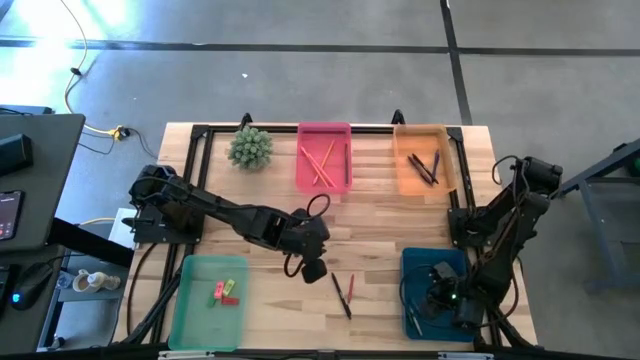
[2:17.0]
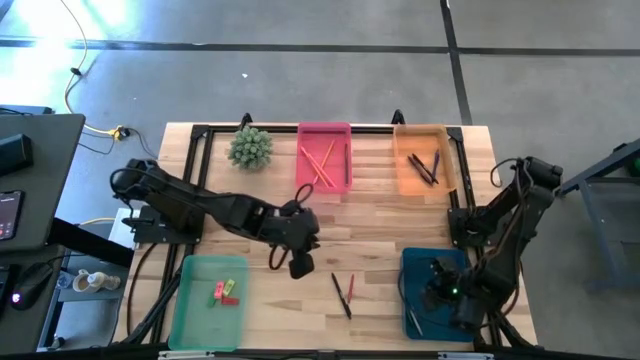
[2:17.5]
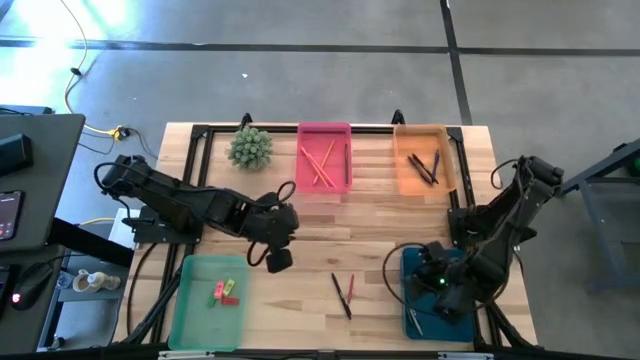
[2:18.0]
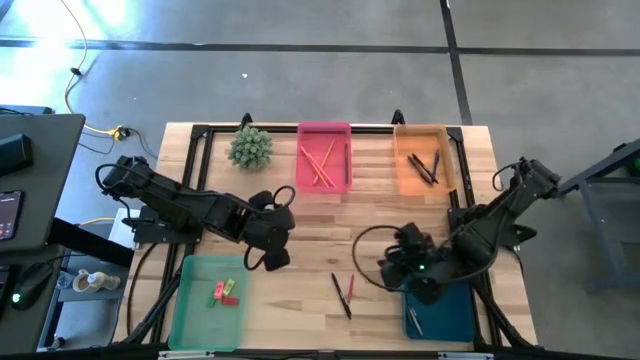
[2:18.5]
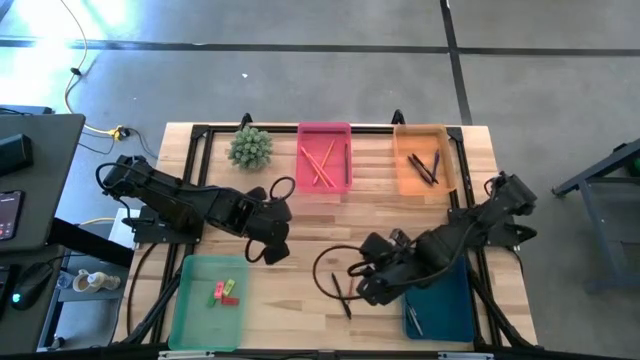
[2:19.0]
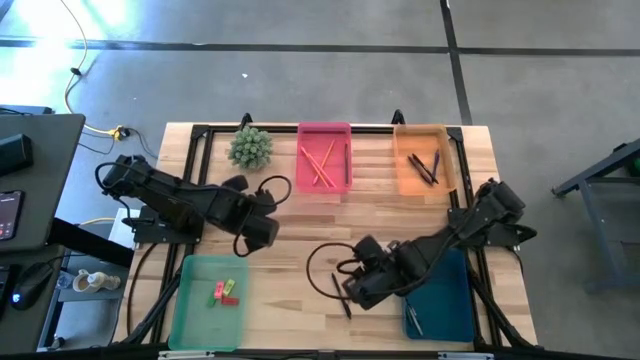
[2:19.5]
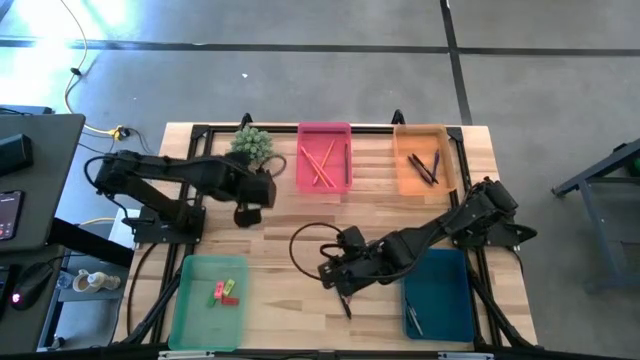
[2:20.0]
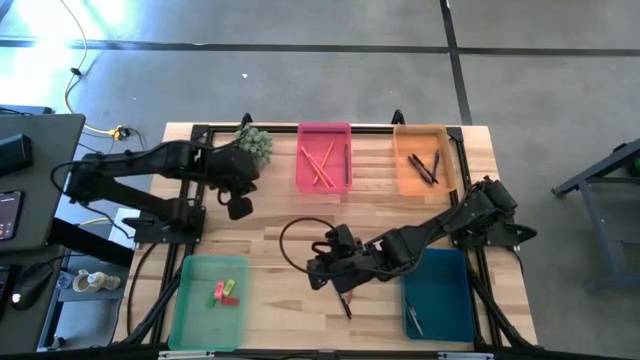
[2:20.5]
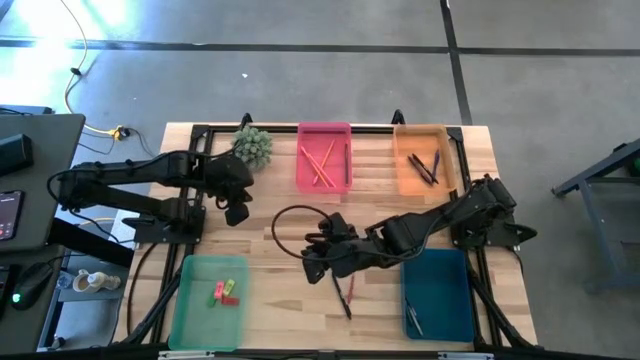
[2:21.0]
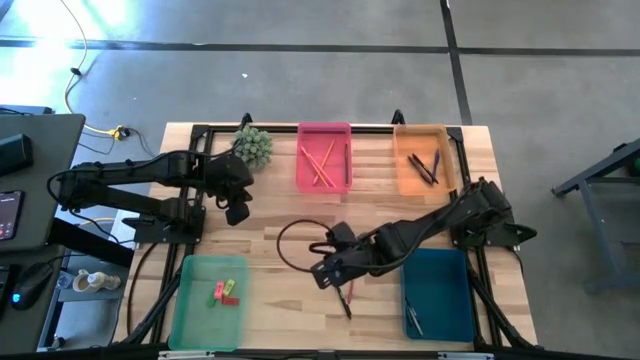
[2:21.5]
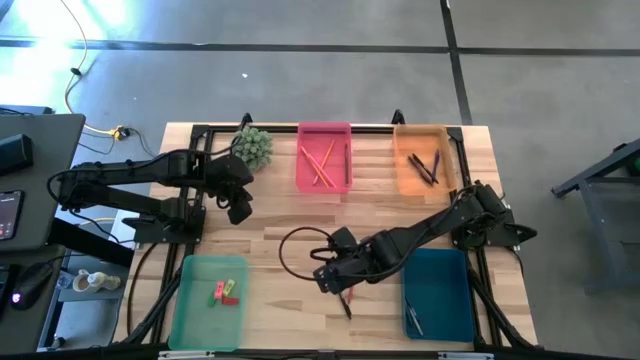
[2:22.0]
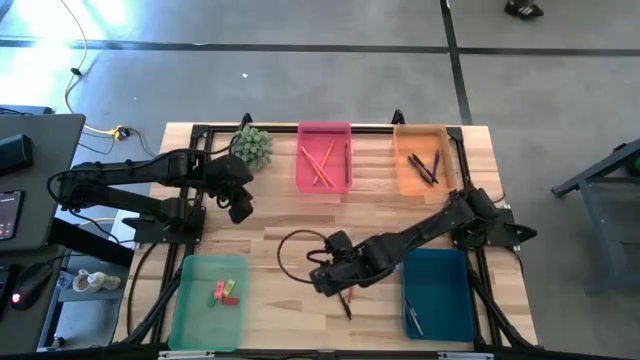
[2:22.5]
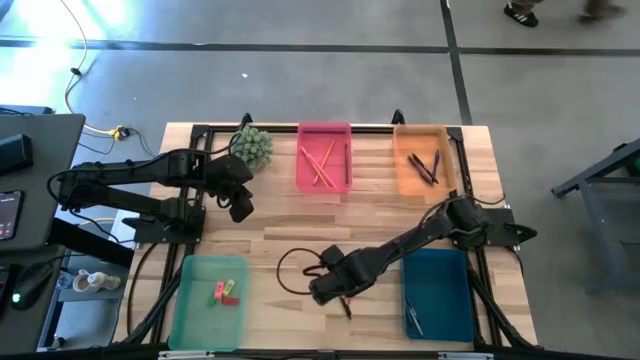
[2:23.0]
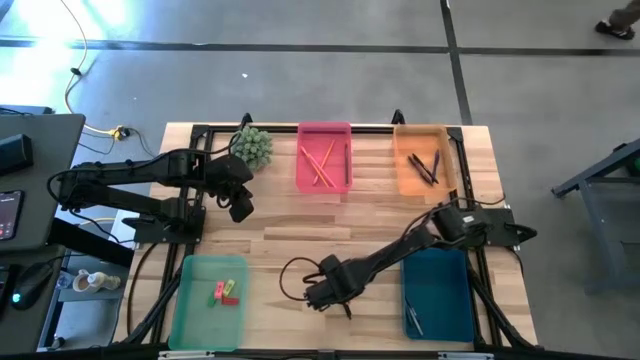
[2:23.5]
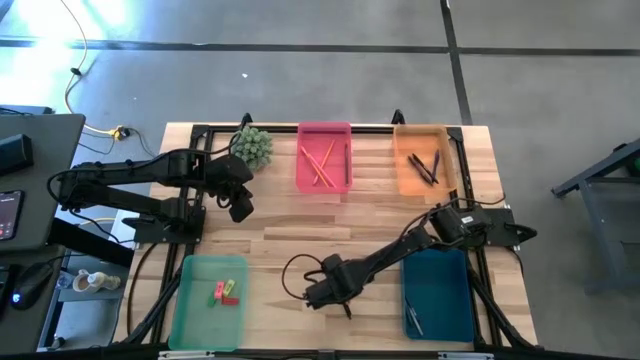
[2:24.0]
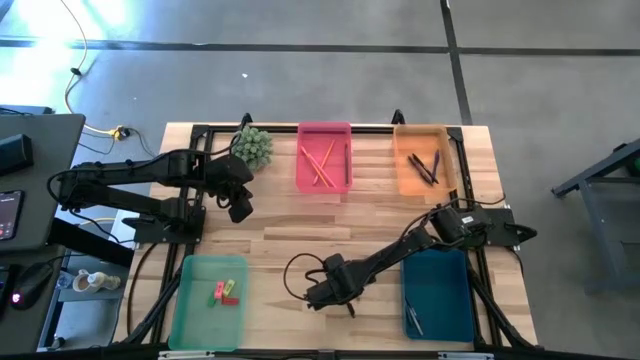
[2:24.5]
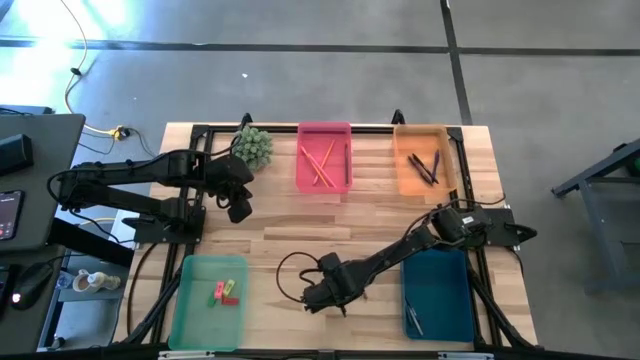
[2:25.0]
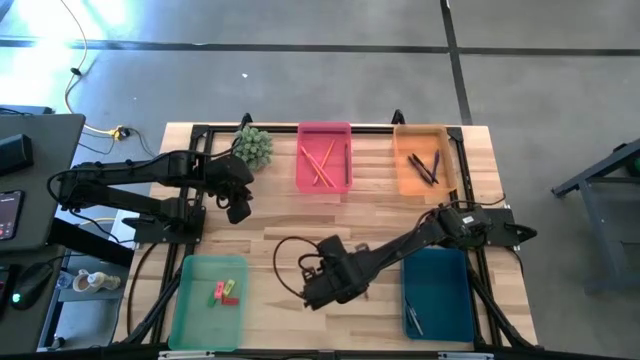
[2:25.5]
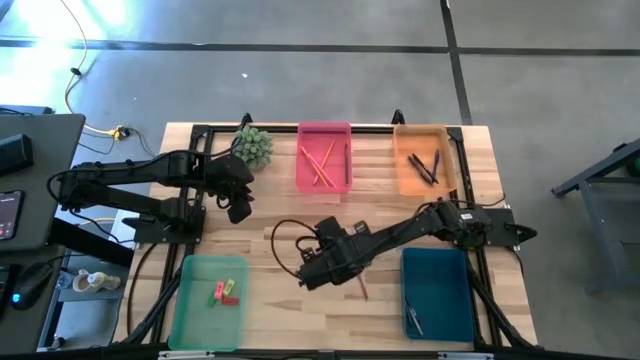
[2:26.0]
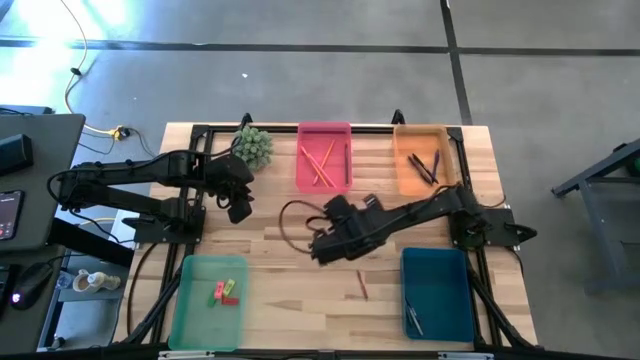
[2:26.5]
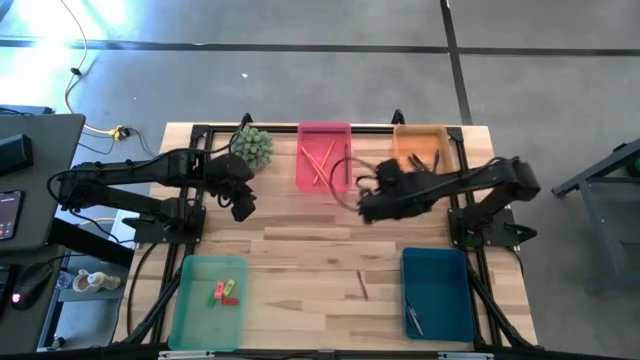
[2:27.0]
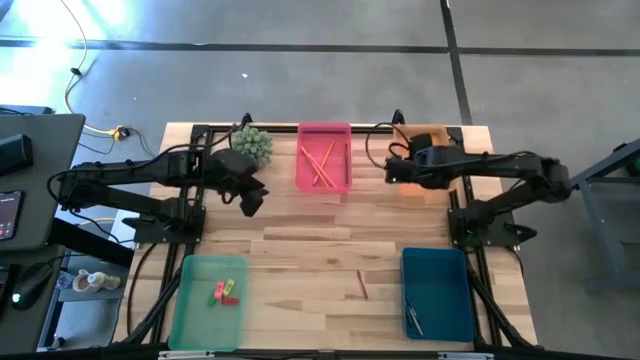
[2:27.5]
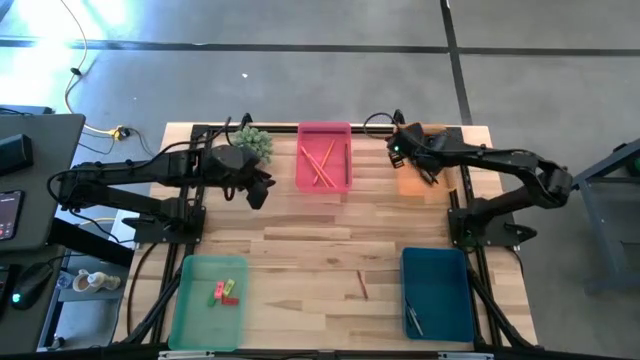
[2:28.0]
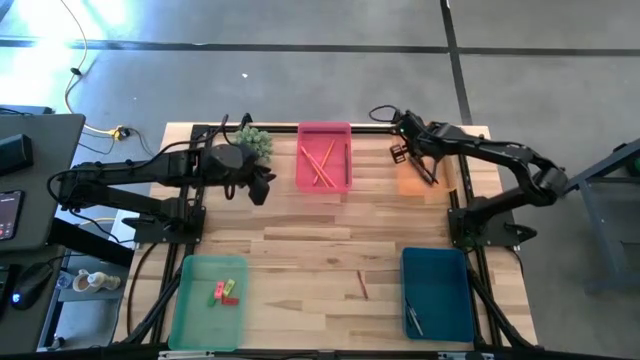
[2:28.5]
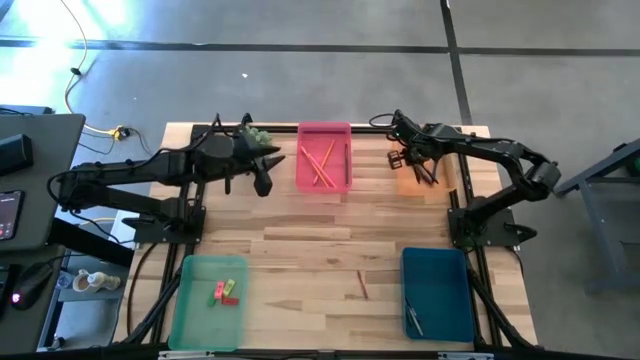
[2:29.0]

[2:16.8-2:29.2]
Task: Sort crayons/erasers/pens/pencils in bins
Put the black pen into the orange bin

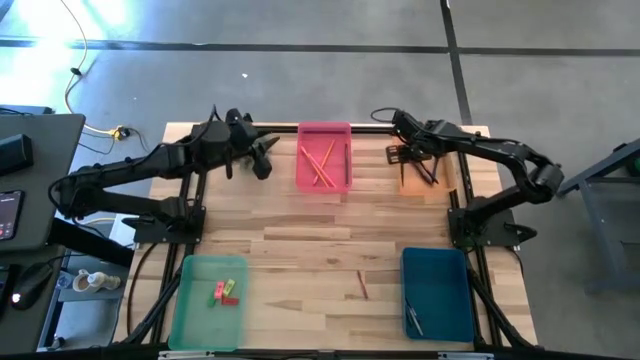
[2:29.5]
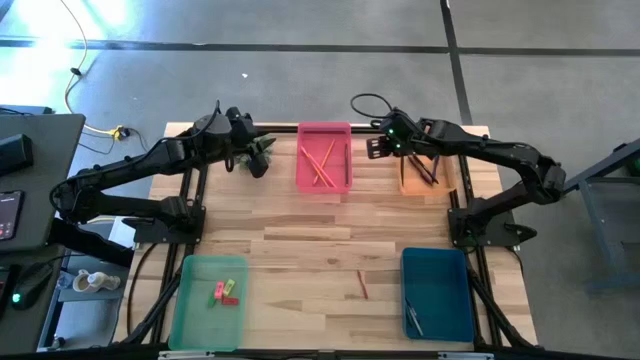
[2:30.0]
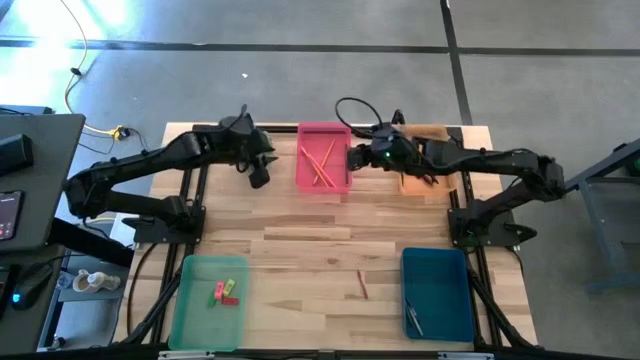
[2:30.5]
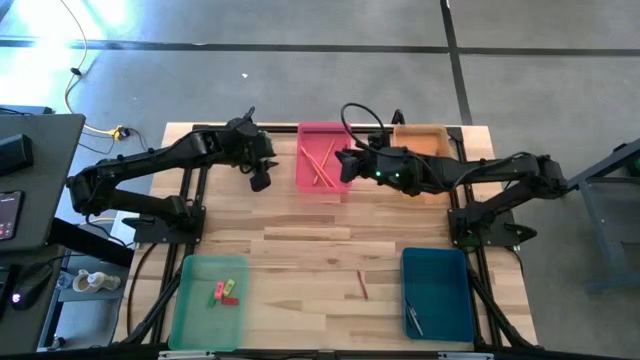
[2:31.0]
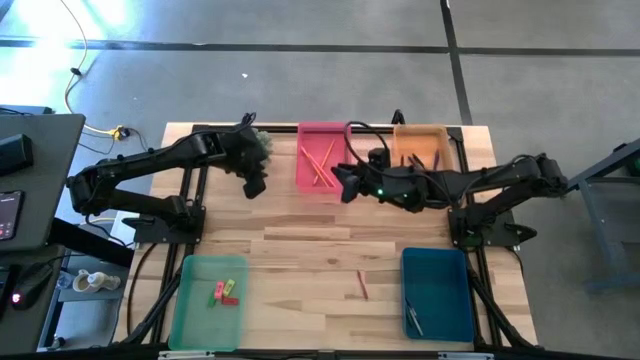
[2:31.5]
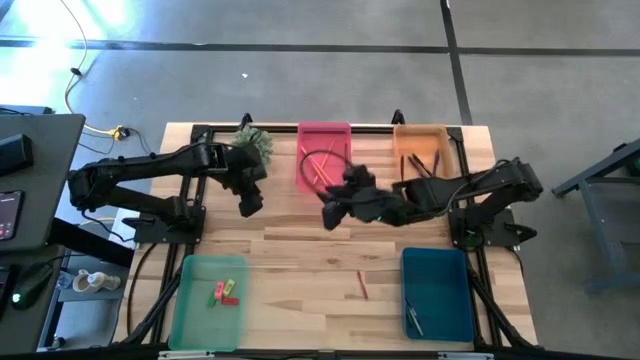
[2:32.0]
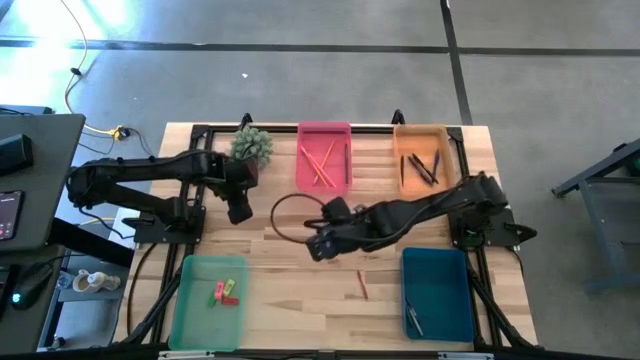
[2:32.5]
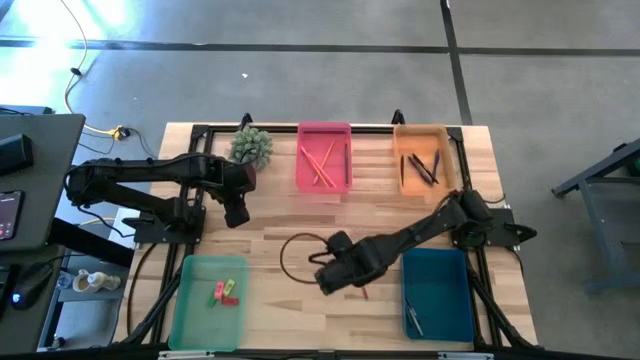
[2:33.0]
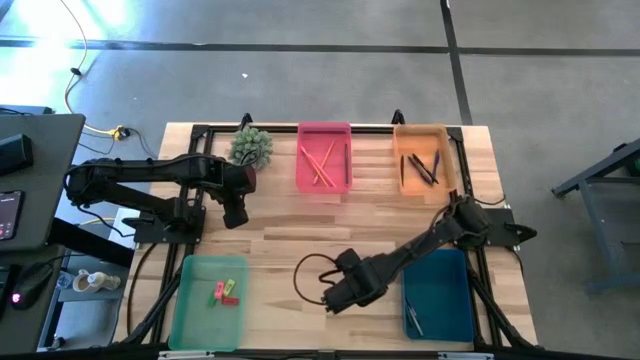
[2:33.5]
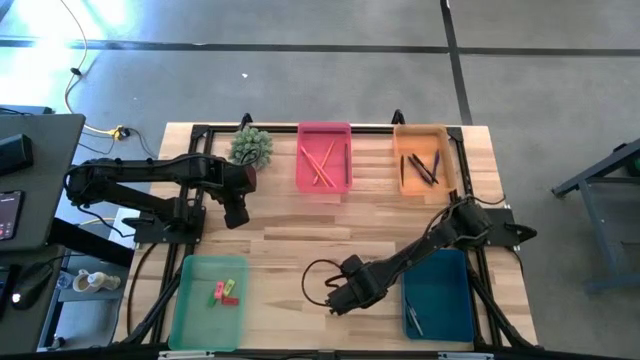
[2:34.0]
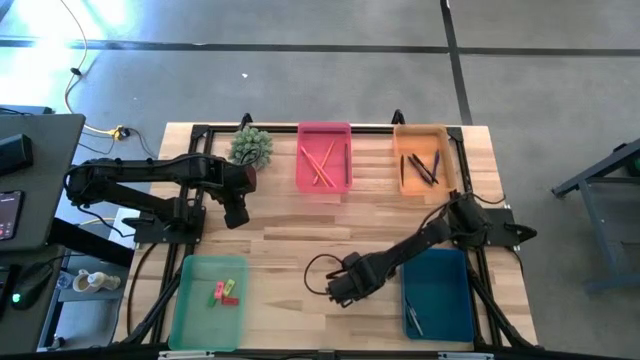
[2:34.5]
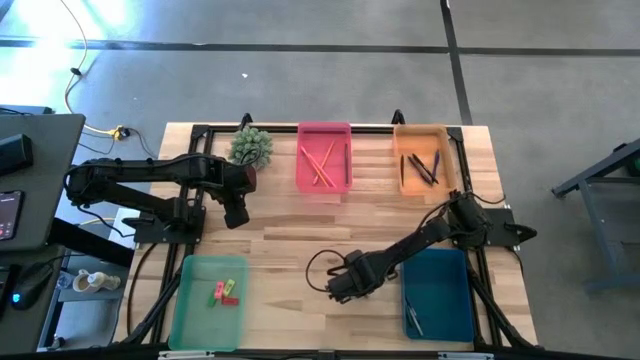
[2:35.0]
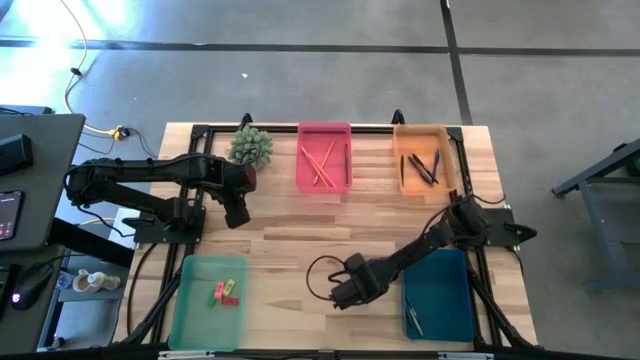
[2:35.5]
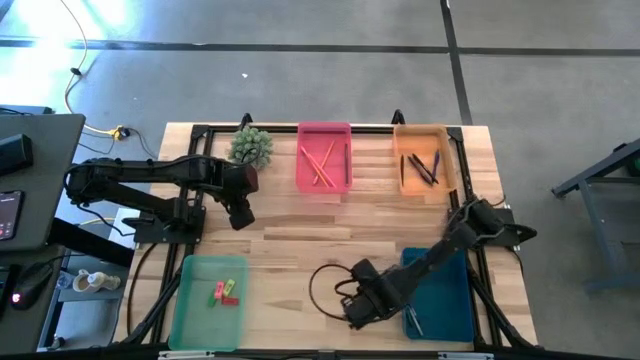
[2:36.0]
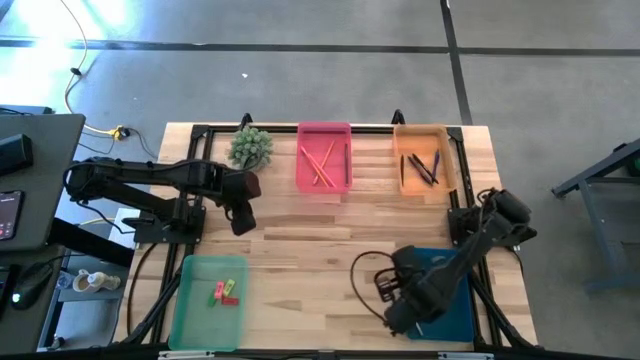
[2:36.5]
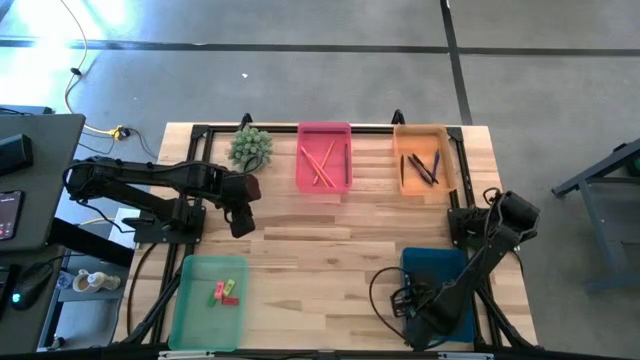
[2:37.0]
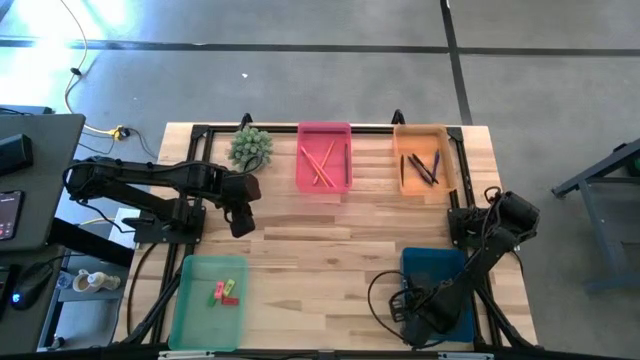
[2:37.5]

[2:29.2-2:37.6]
Put the red crayon into the blue bin

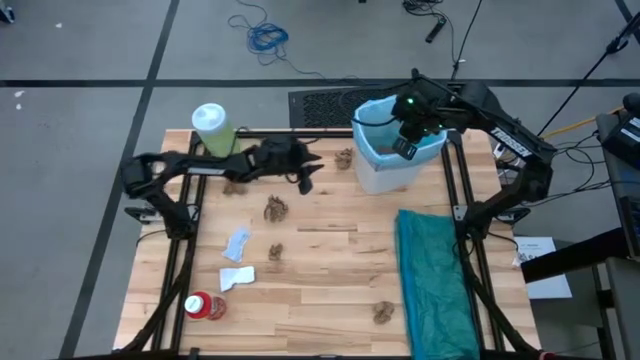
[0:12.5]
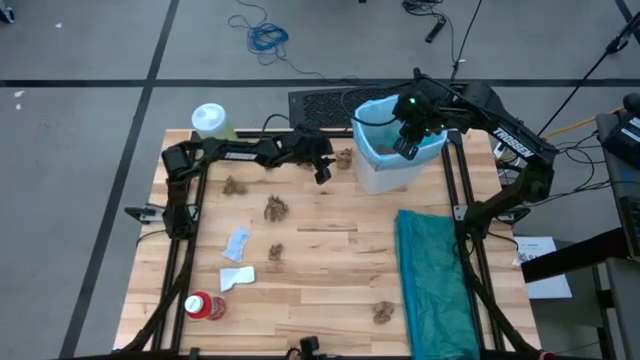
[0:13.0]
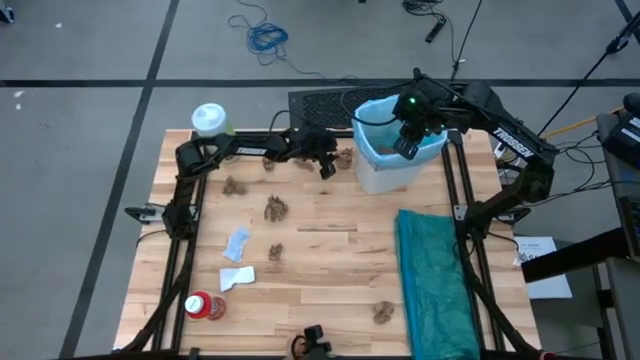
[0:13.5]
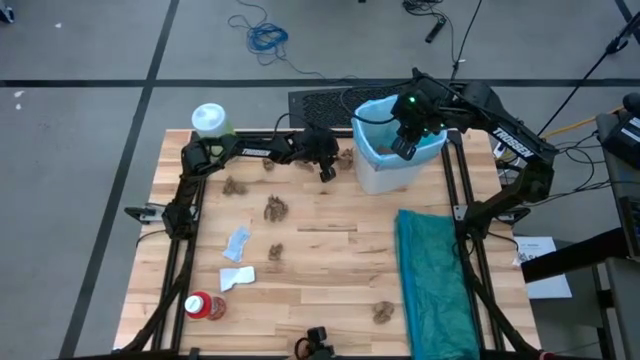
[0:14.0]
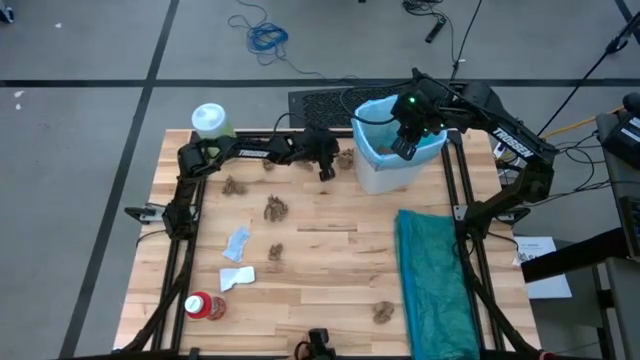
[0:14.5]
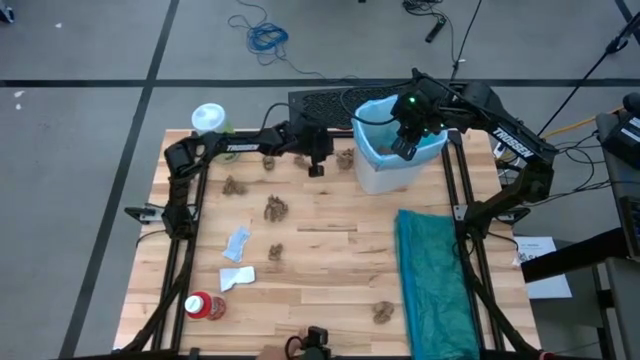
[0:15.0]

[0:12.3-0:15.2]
Task: place trash/remove bag and relplace
Put the brown paper trash into the trash bin
